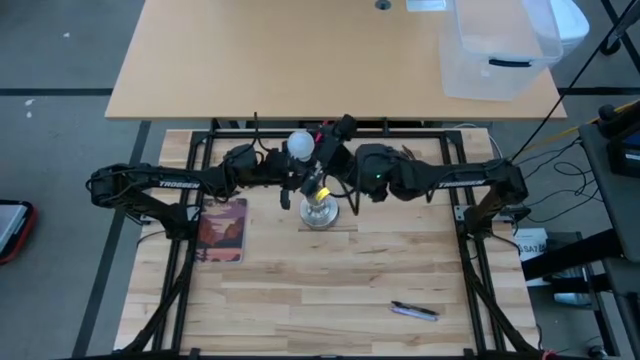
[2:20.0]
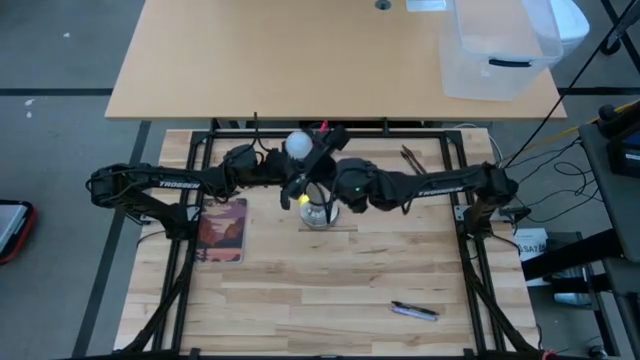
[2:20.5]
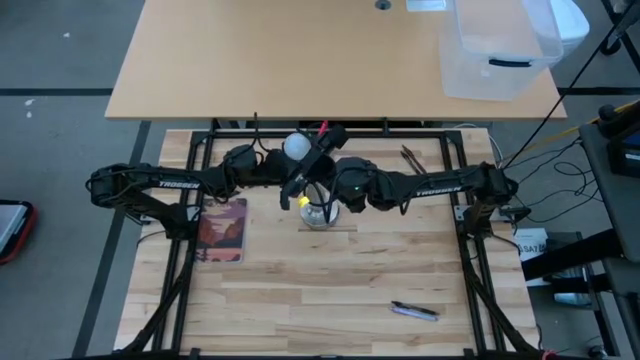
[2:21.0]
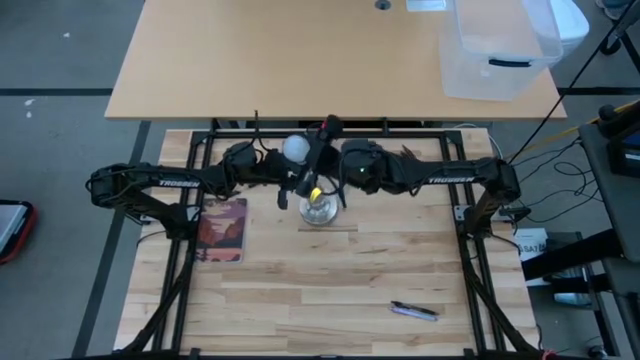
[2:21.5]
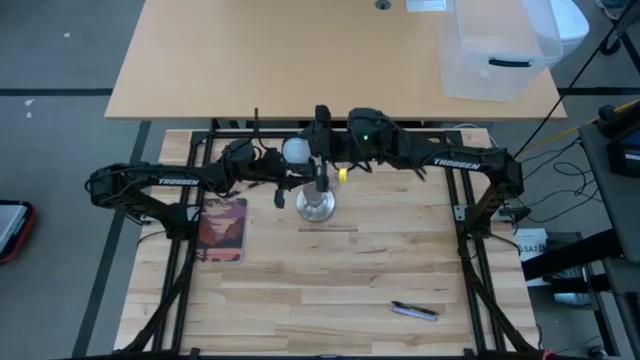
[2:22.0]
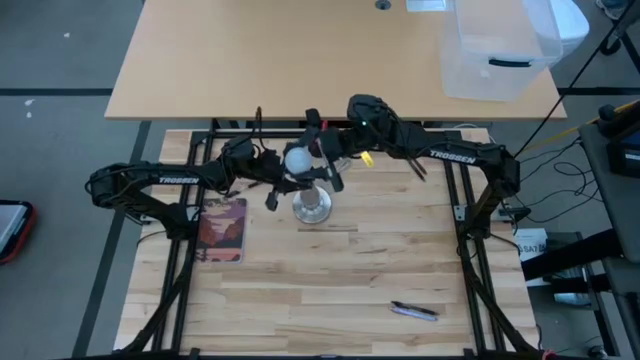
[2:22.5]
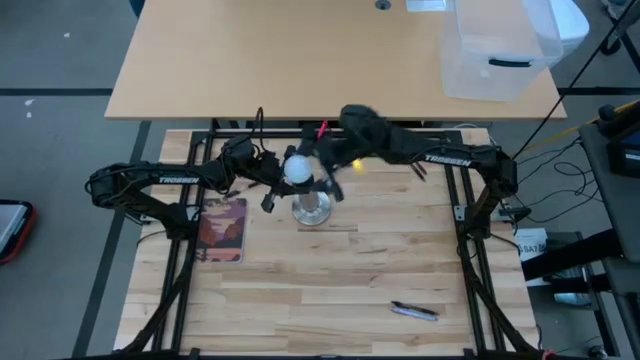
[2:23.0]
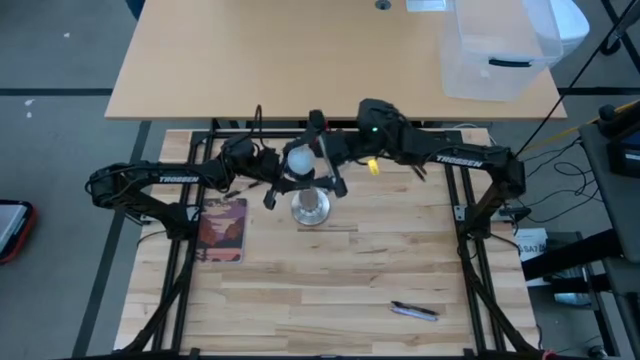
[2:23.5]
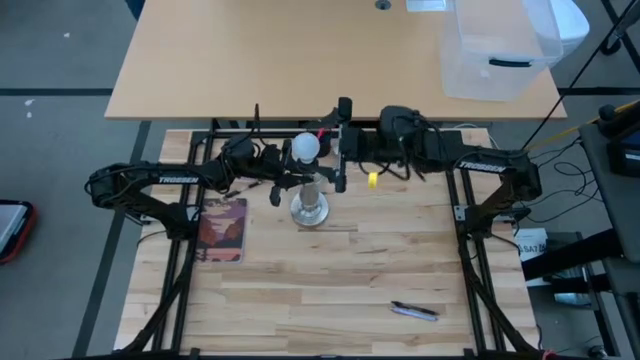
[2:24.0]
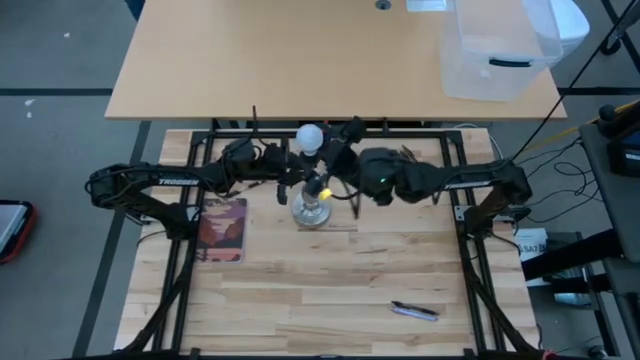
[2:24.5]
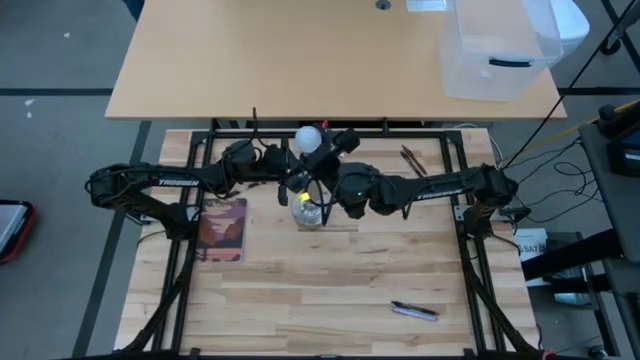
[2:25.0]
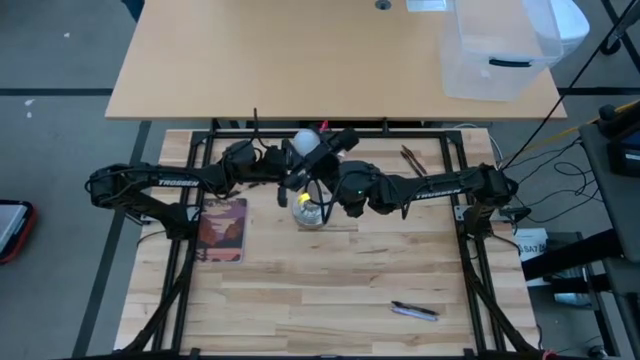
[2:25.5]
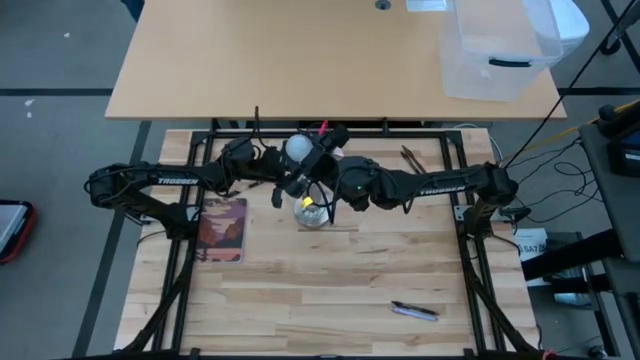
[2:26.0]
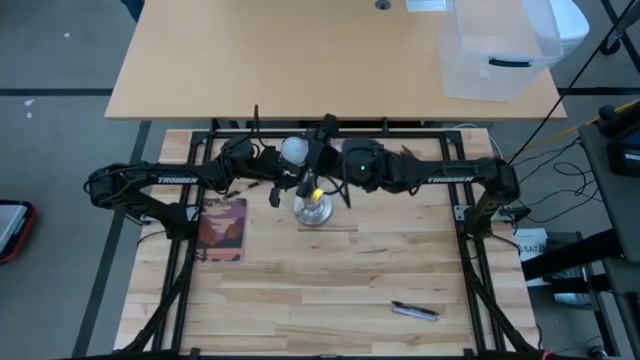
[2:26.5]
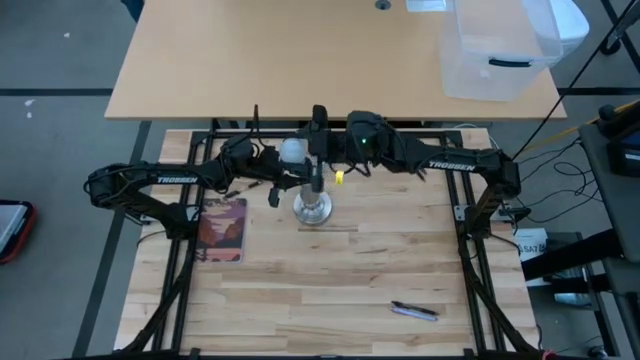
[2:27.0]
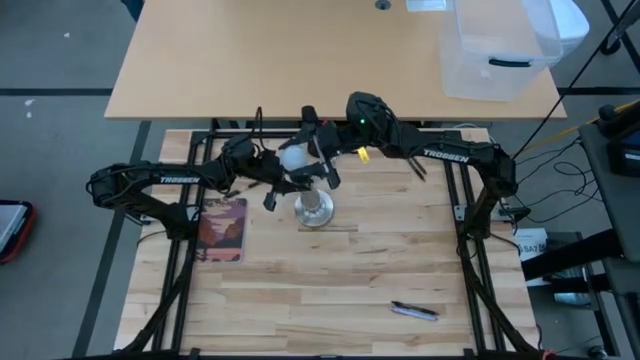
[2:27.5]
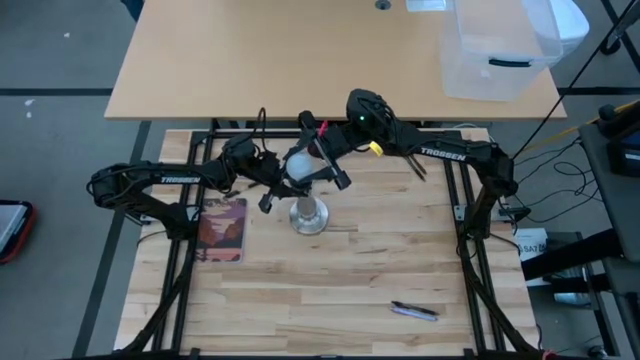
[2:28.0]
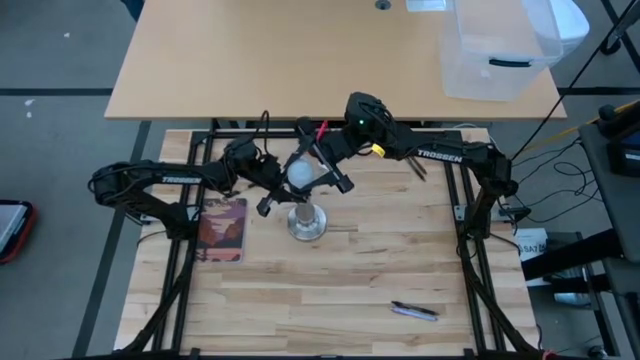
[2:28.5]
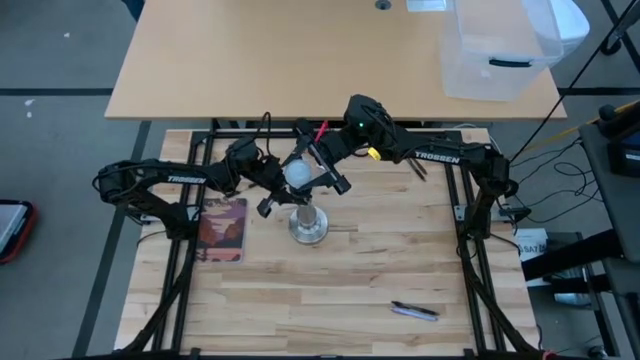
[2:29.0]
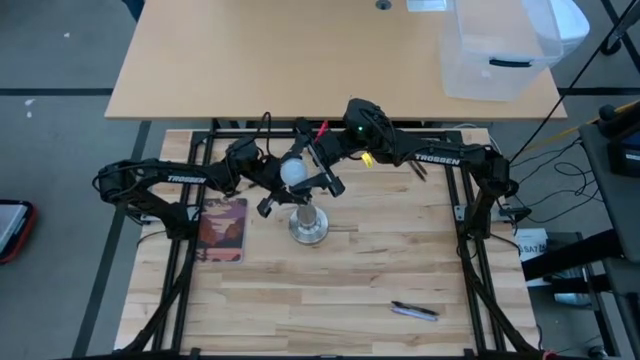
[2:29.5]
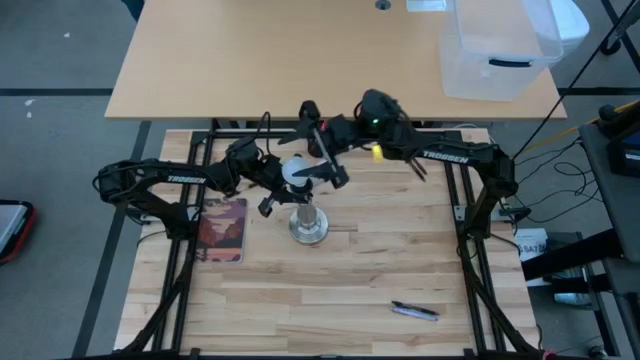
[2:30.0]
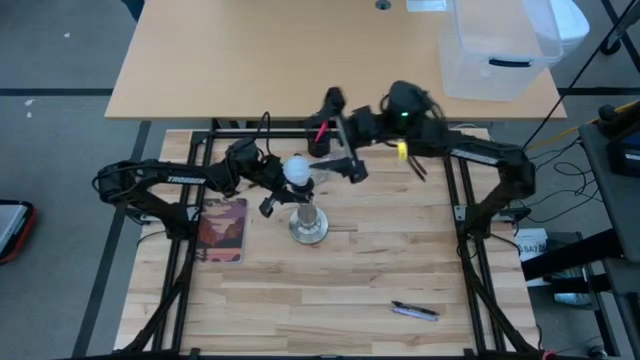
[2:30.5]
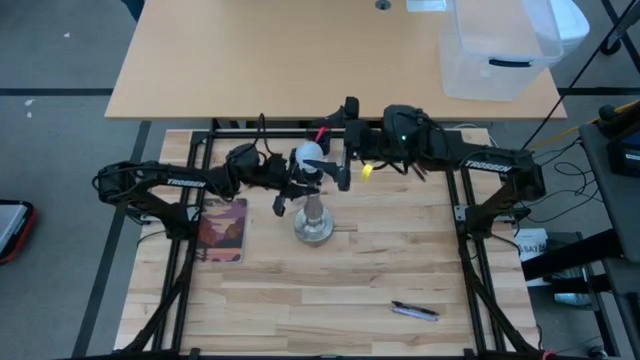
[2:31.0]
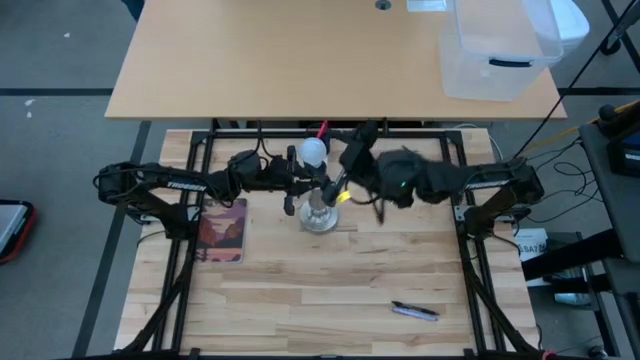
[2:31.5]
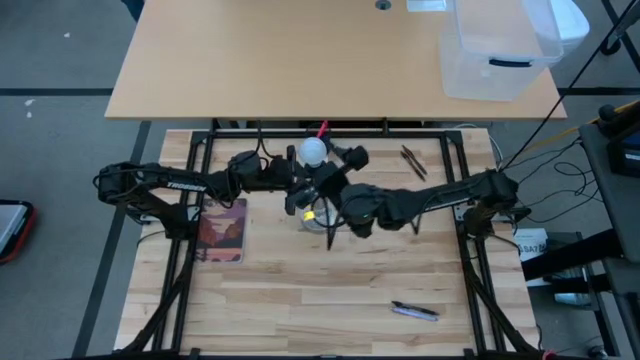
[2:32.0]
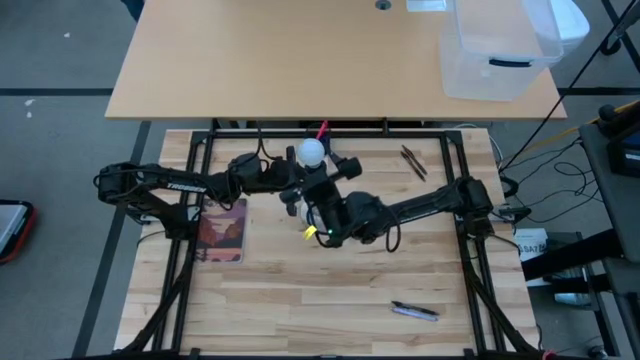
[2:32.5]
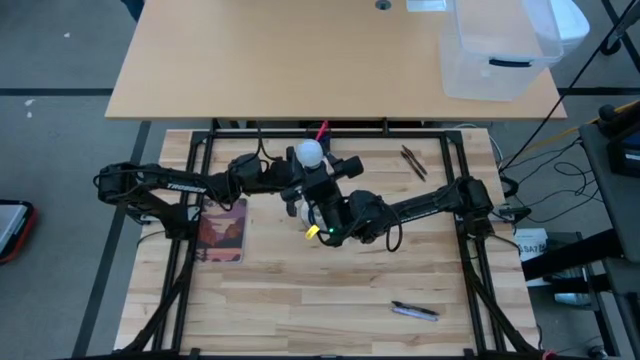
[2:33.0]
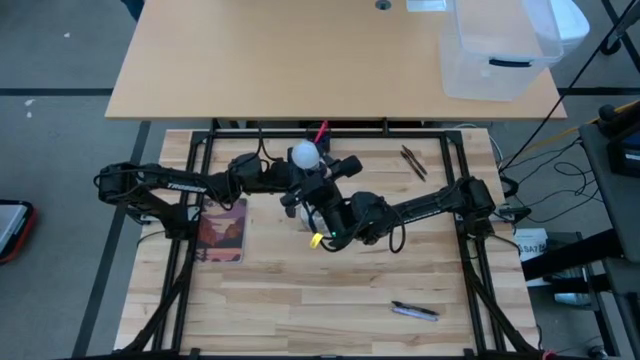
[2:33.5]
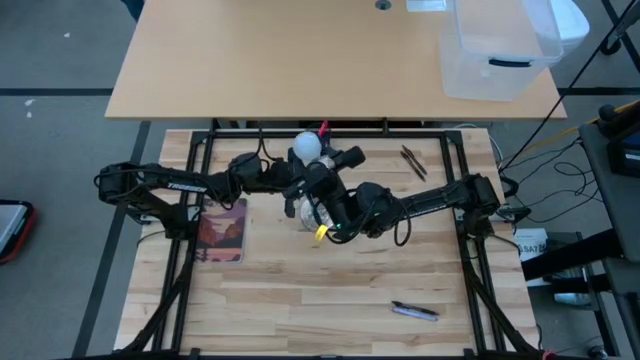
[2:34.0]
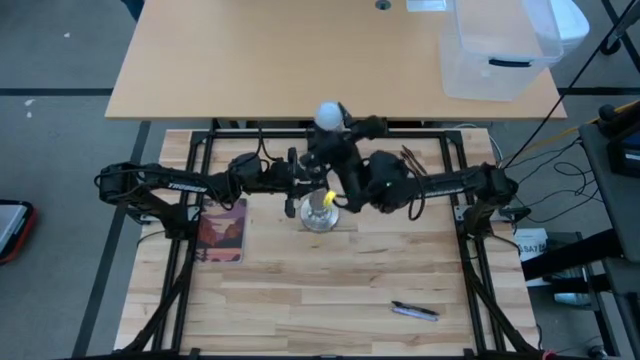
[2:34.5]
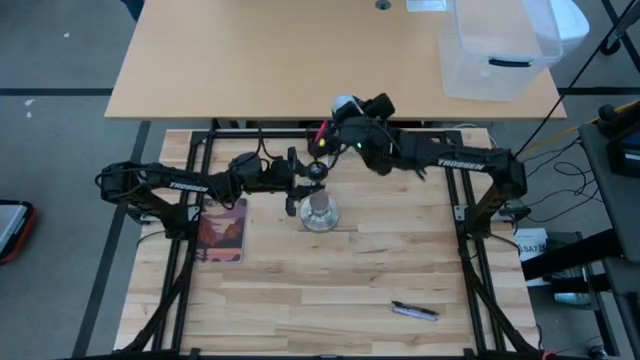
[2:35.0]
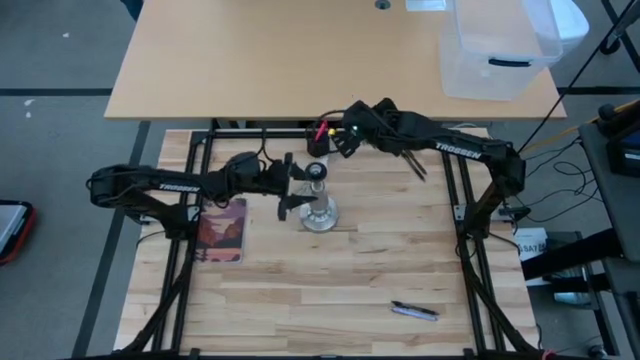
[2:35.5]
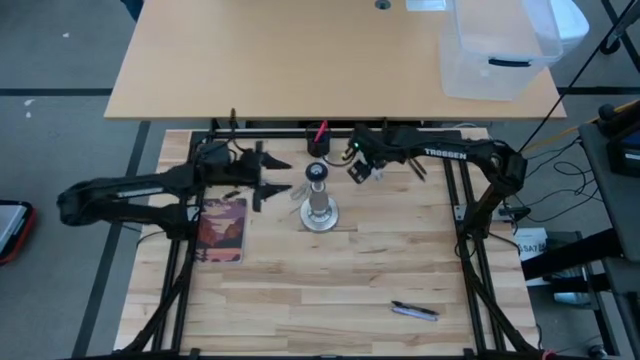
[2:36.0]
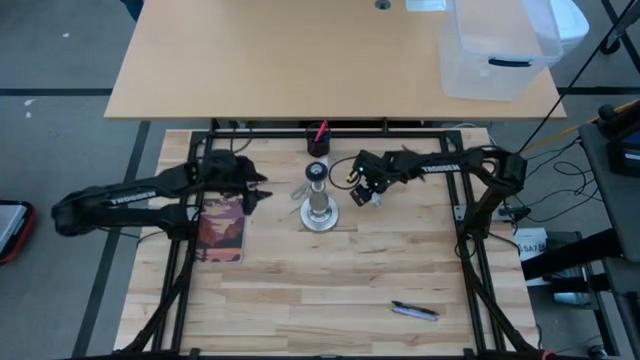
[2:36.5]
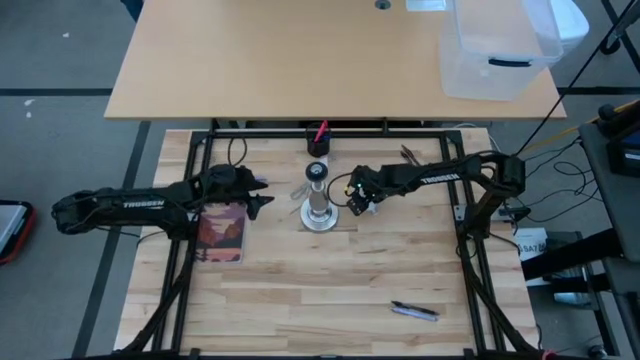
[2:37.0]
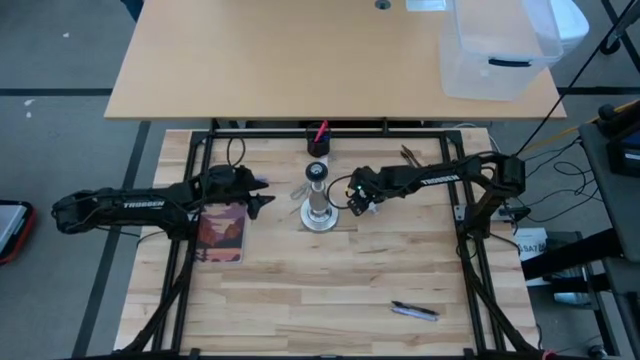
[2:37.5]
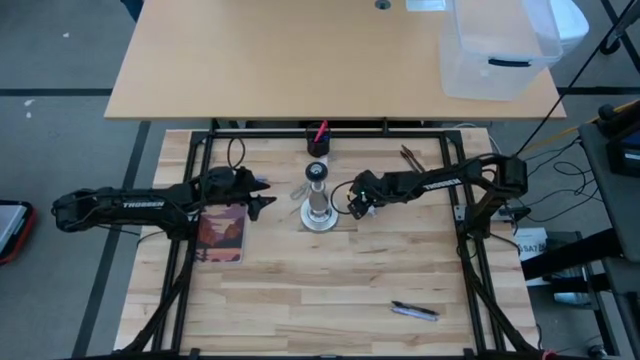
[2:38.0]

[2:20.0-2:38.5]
Task: Screw lightbulb
Remove the lightbulb from the desk lamp

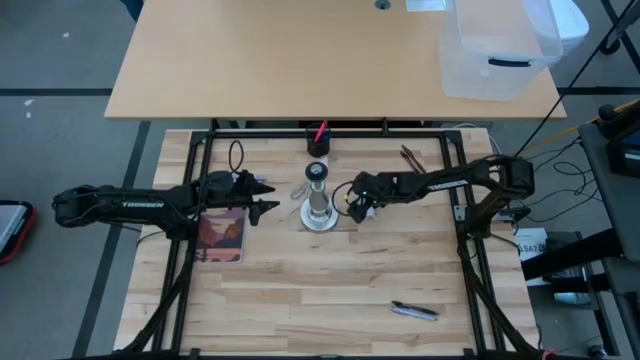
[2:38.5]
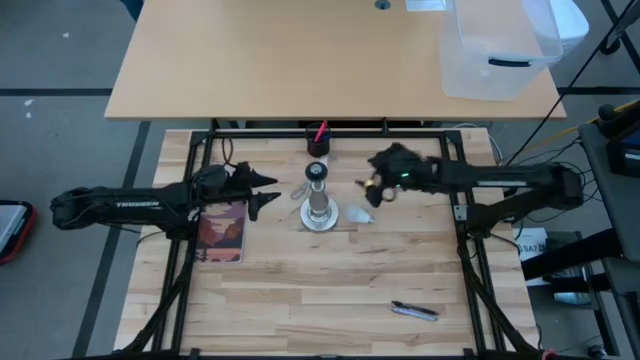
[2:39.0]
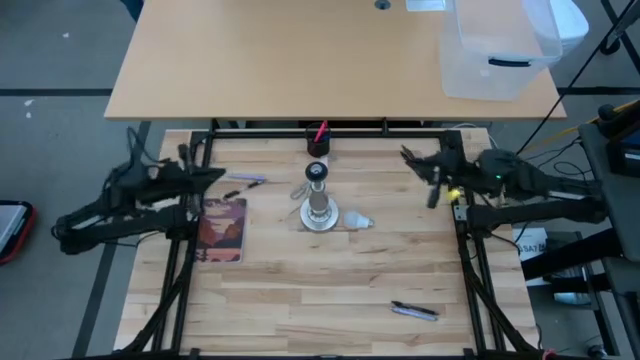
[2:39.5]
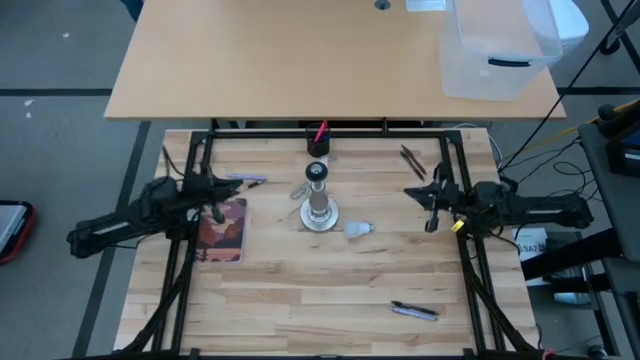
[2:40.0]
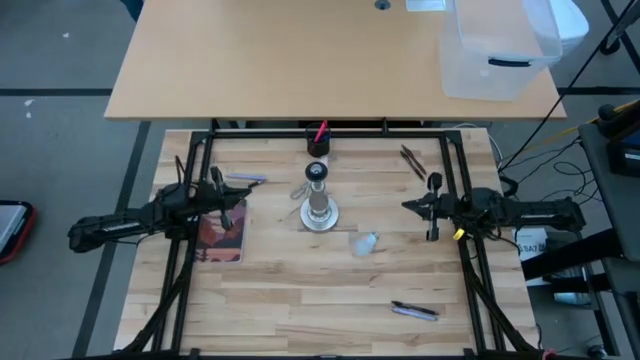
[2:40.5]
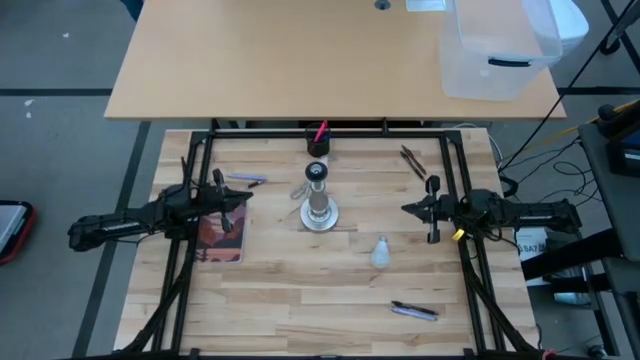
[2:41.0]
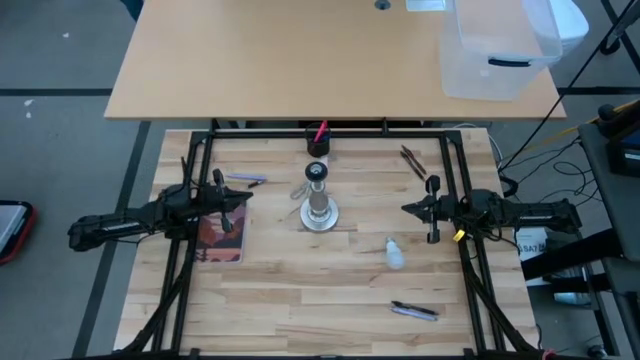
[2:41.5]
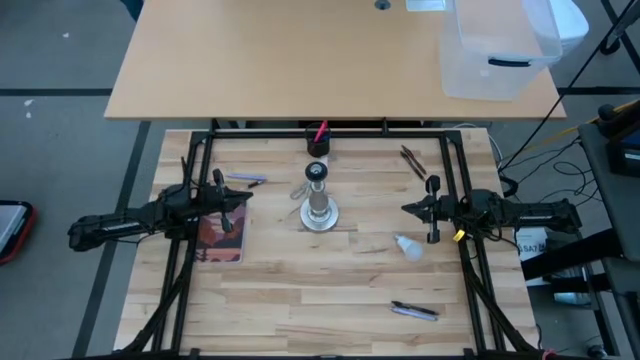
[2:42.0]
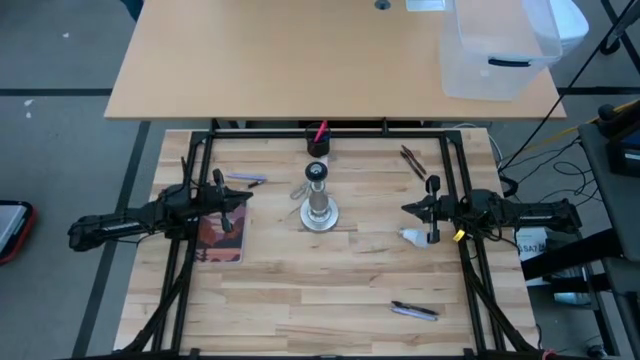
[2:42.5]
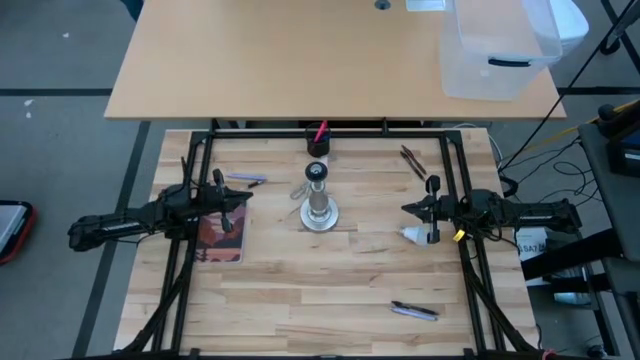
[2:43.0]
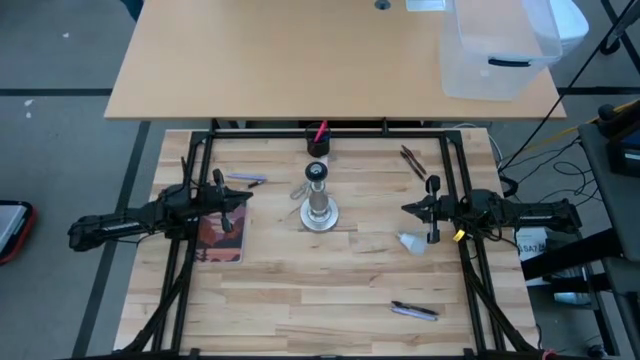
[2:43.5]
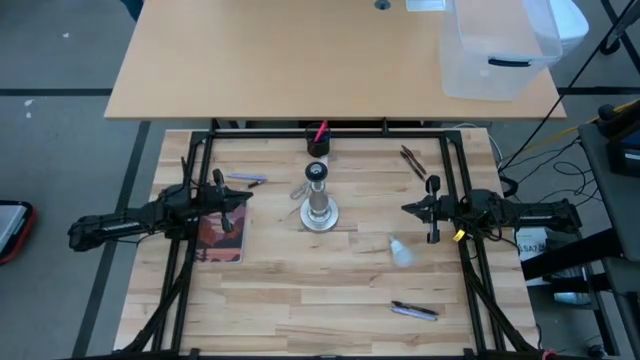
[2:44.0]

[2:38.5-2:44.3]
Return to Home Position
